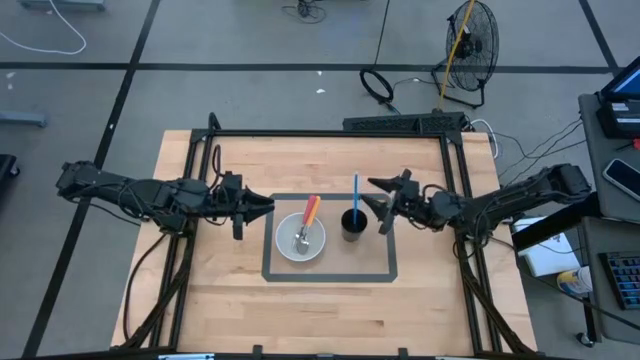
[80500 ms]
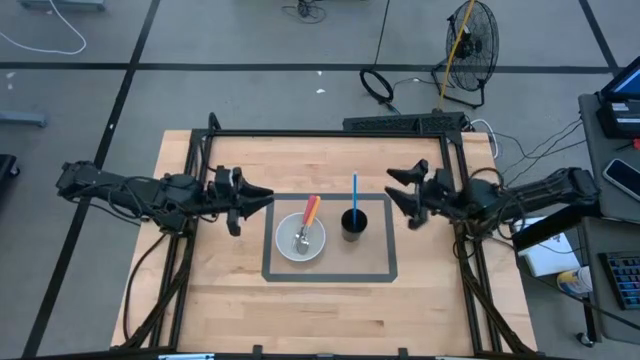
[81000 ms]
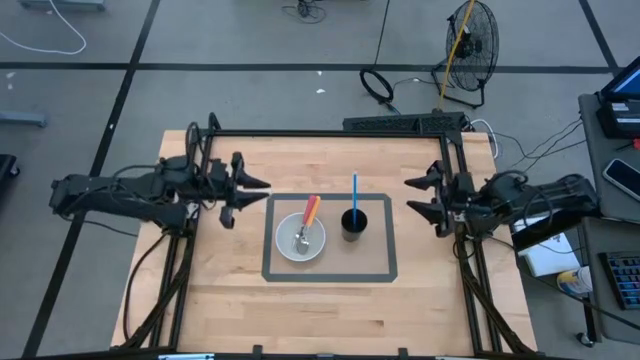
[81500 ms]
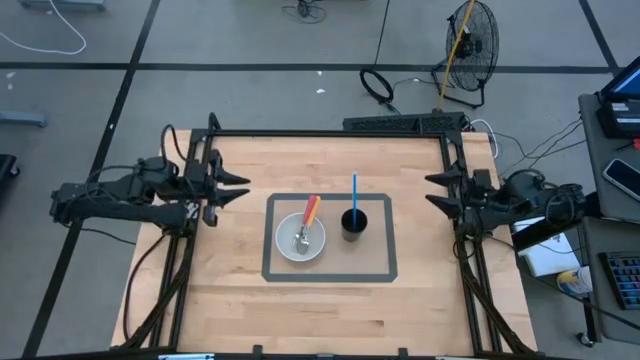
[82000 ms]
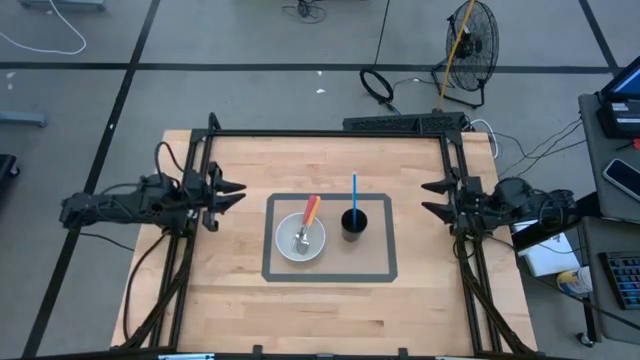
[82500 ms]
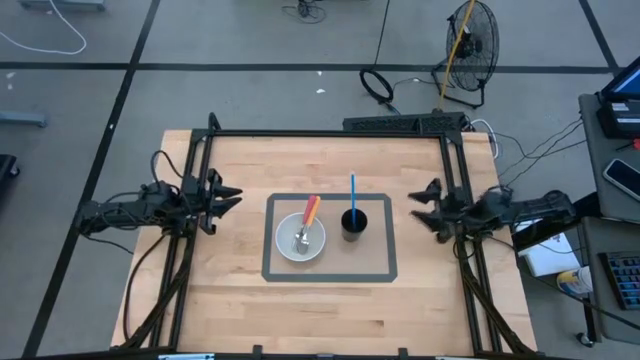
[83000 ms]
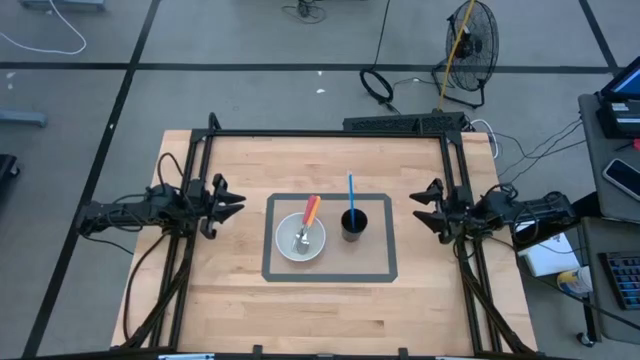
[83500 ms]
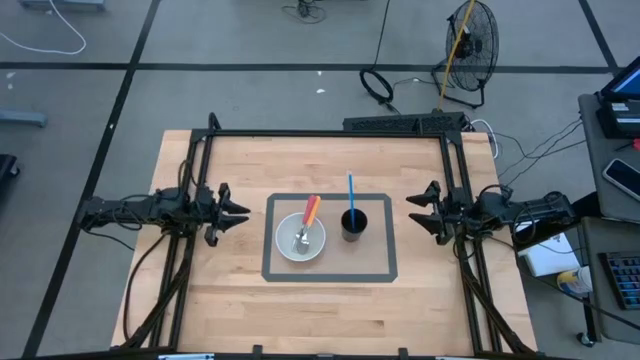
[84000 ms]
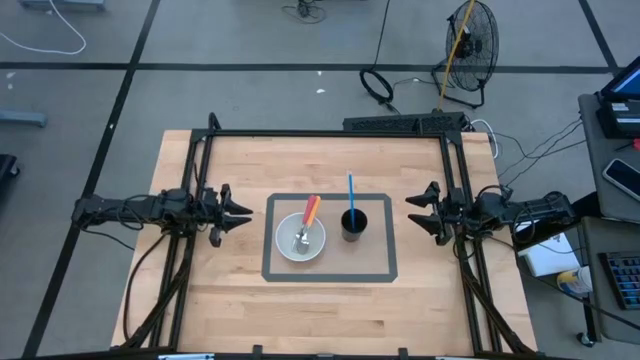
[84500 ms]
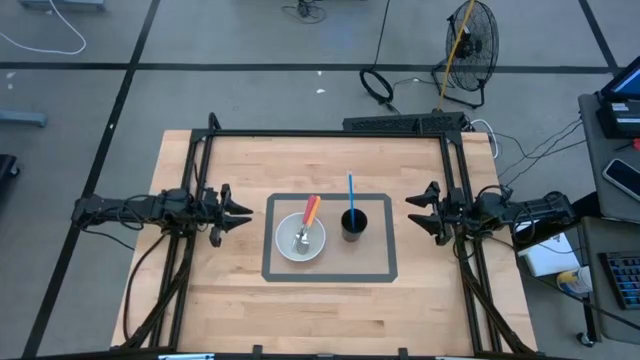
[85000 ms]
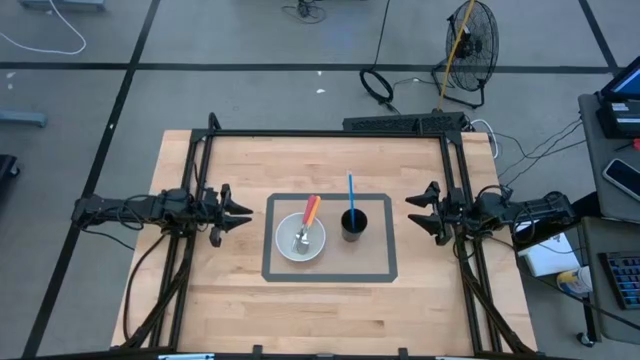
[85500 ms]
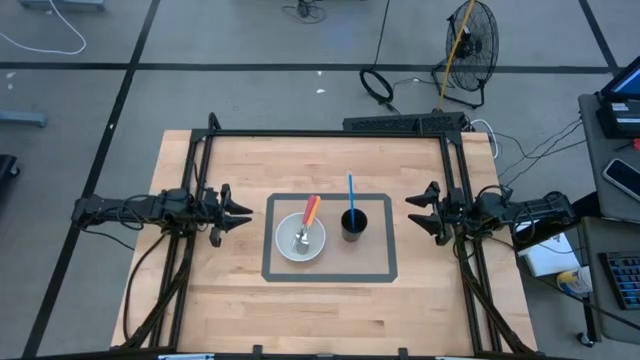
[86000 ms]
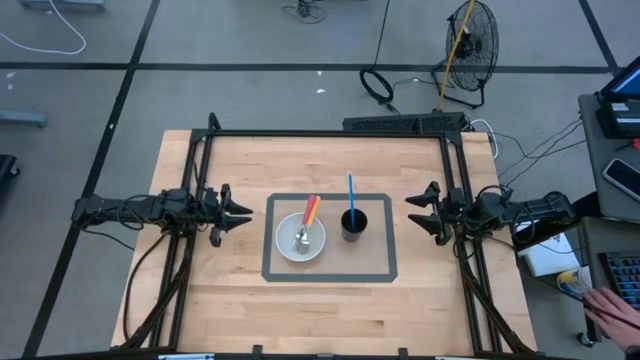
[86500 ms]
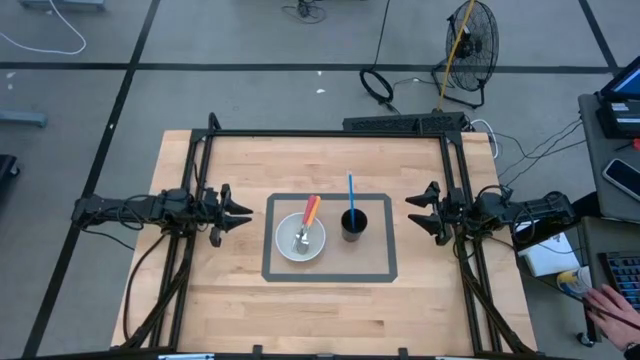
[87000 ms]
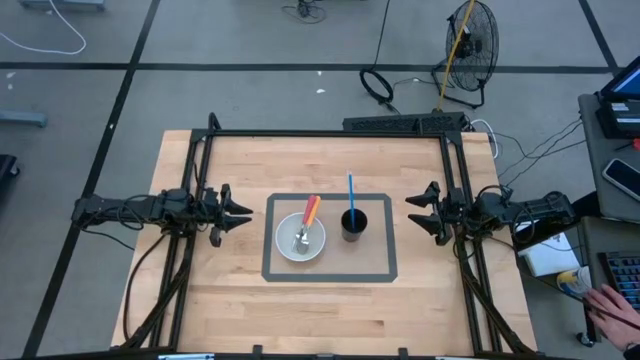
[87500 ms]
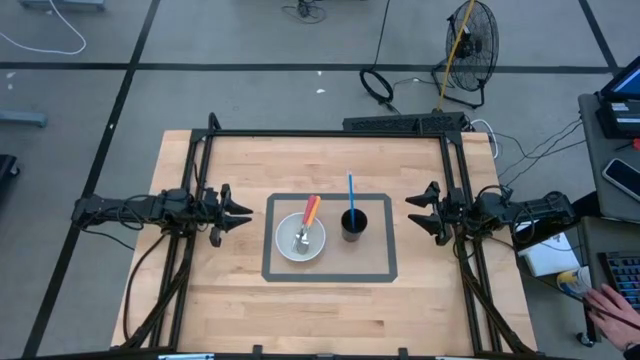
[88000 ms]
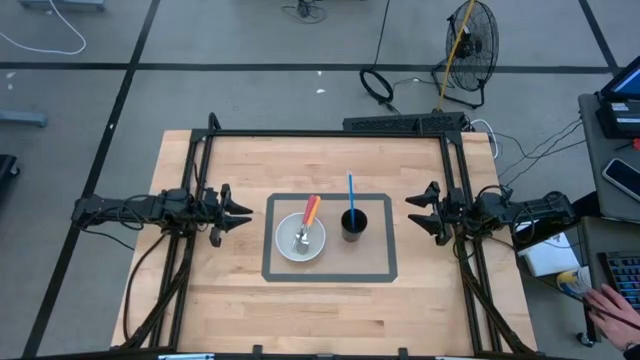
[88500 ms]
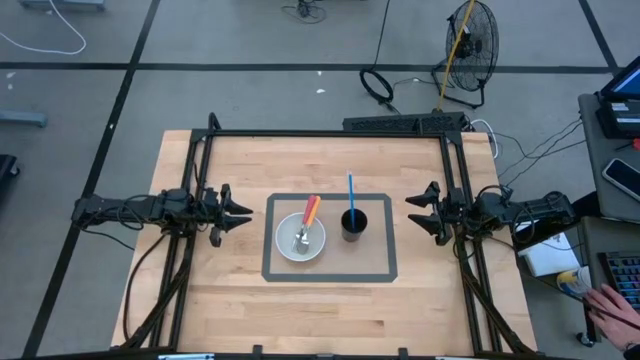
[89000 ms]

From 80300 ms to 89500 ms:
Task: Pick & Place Utensil
Return to Home Position

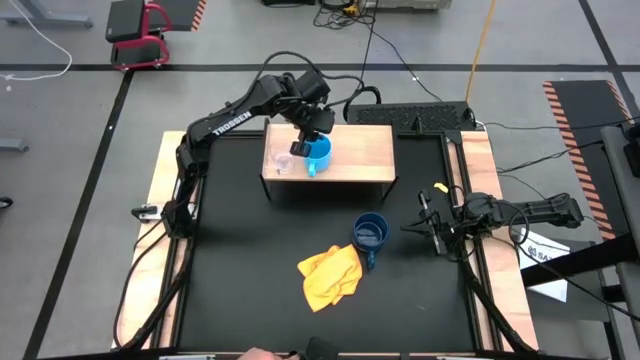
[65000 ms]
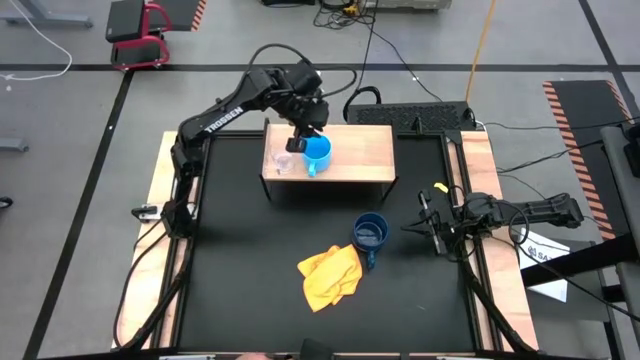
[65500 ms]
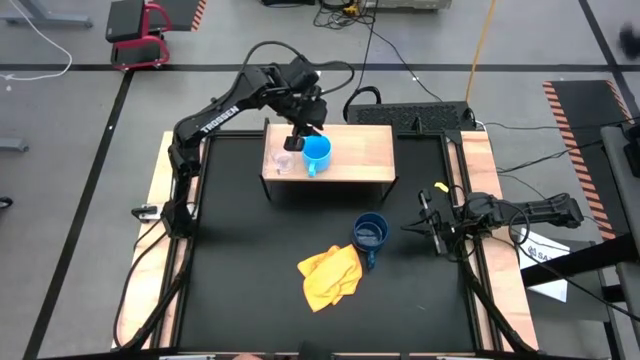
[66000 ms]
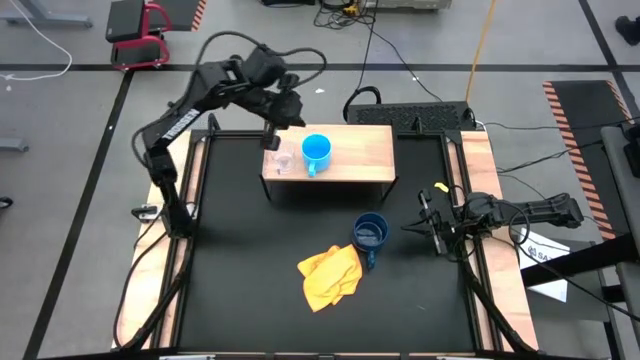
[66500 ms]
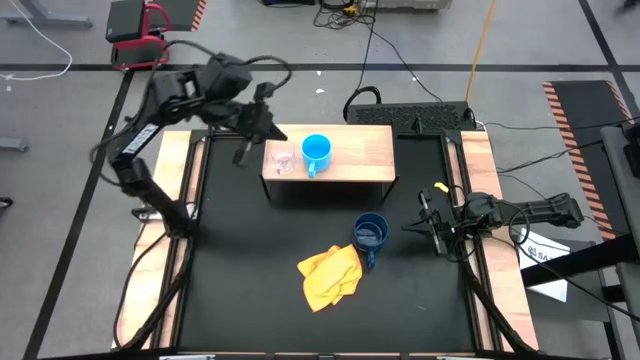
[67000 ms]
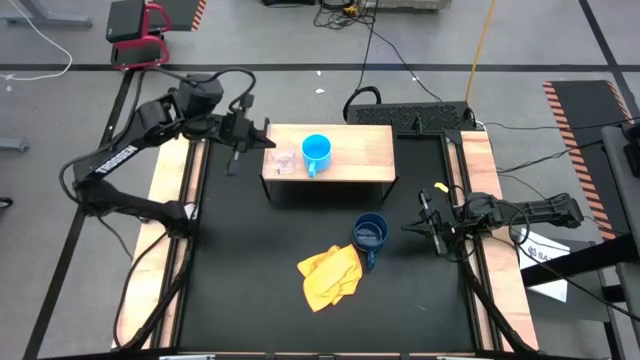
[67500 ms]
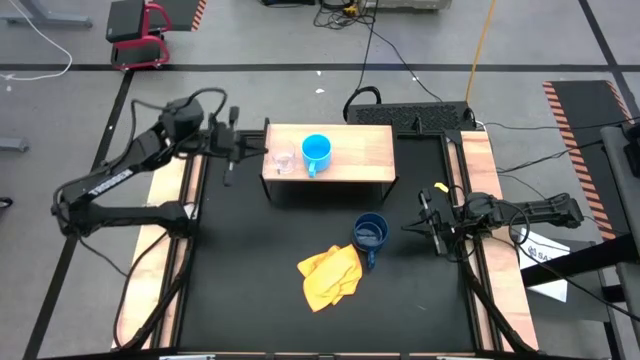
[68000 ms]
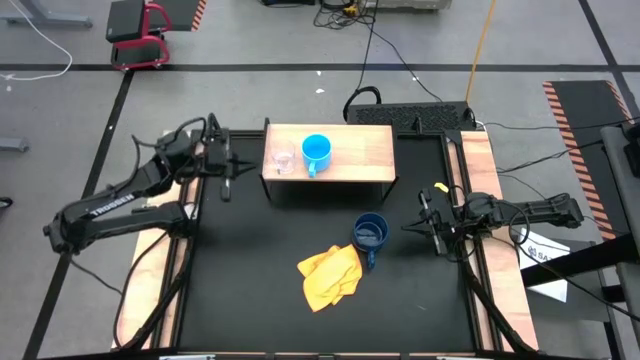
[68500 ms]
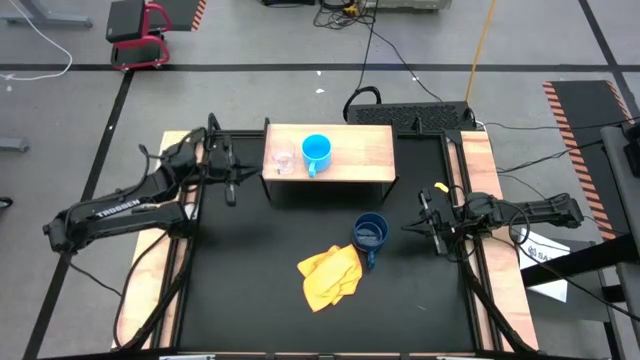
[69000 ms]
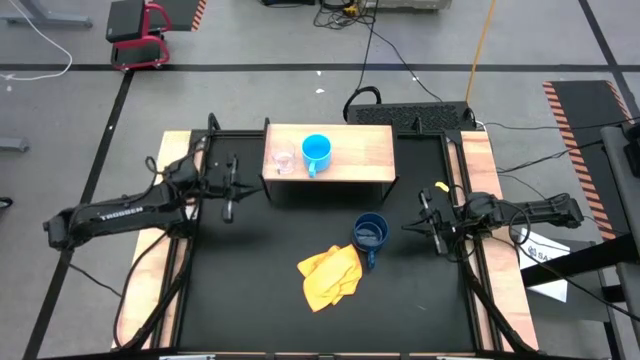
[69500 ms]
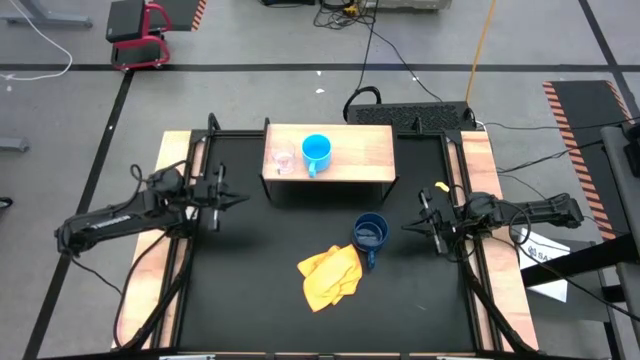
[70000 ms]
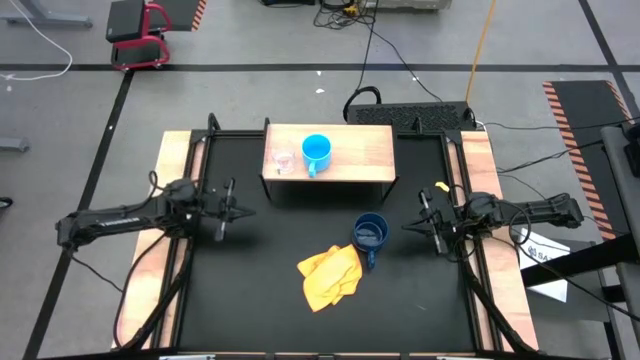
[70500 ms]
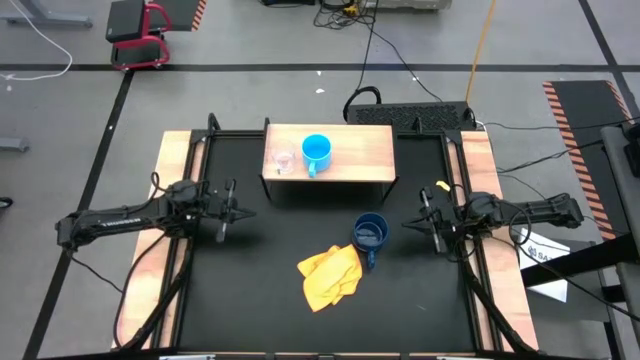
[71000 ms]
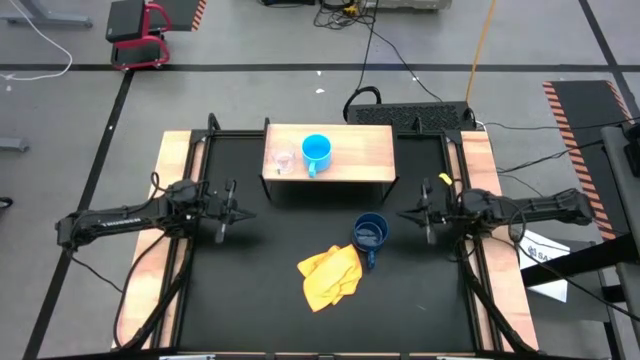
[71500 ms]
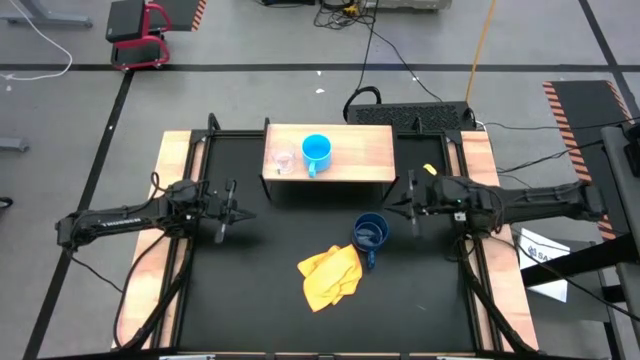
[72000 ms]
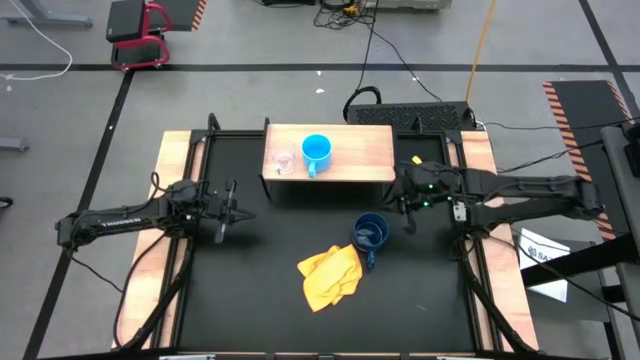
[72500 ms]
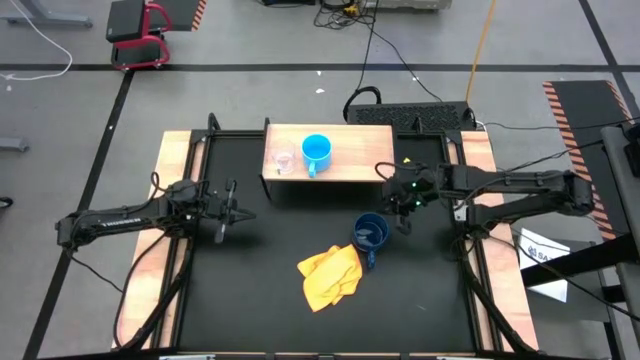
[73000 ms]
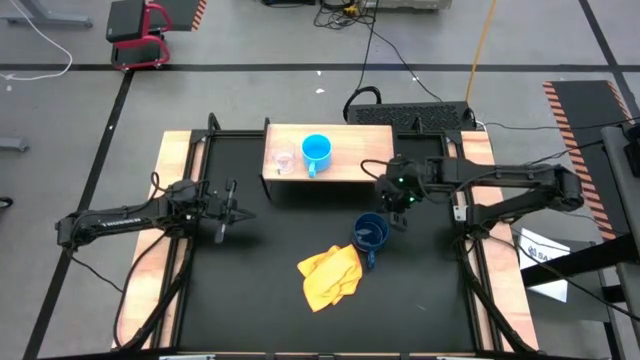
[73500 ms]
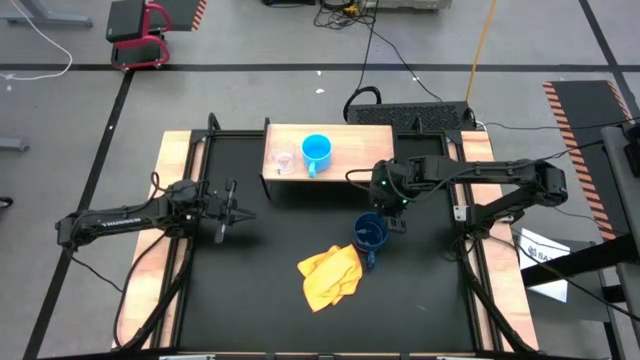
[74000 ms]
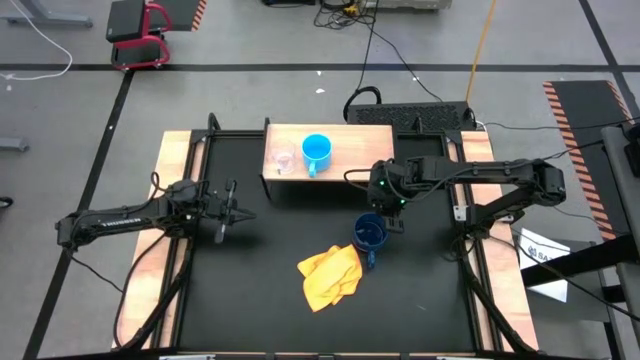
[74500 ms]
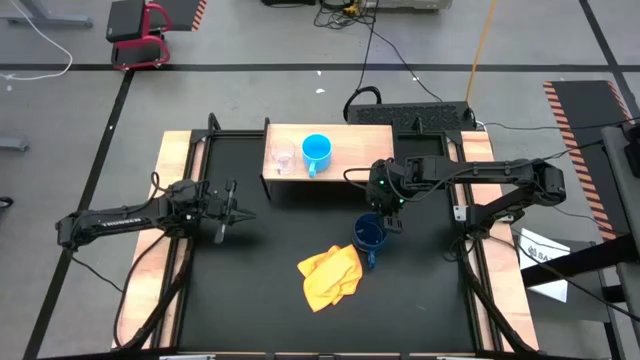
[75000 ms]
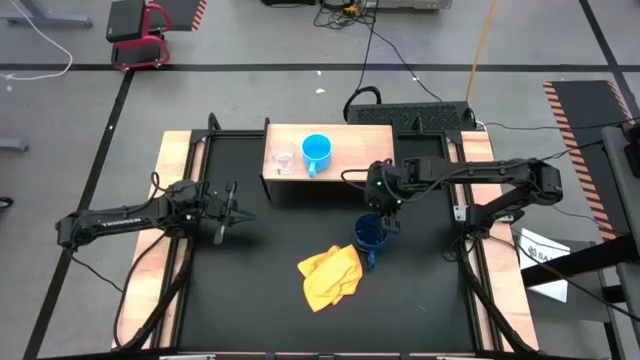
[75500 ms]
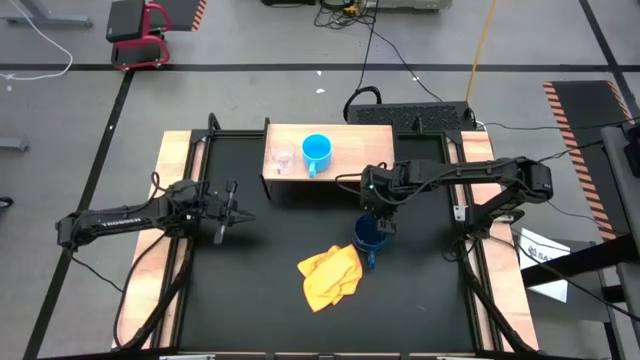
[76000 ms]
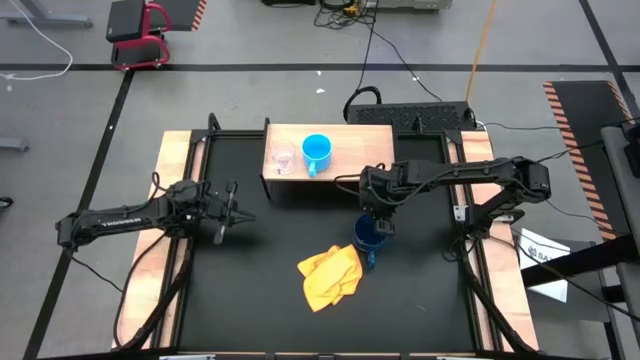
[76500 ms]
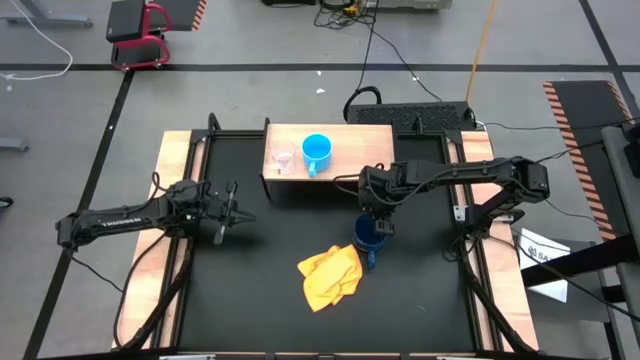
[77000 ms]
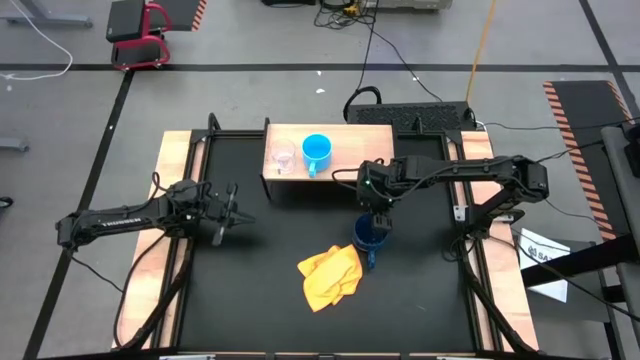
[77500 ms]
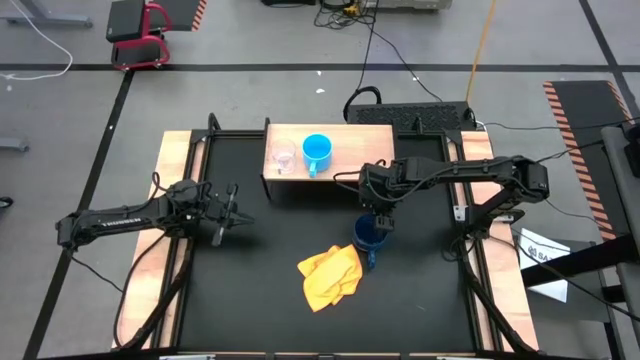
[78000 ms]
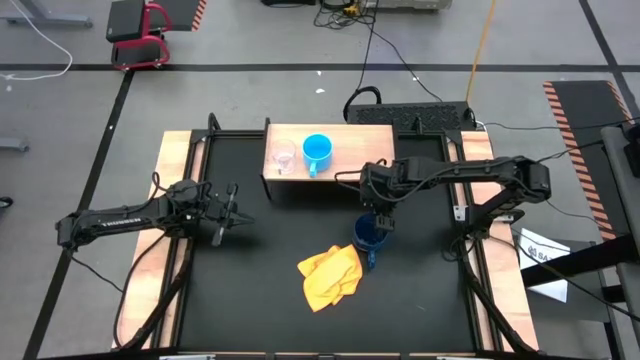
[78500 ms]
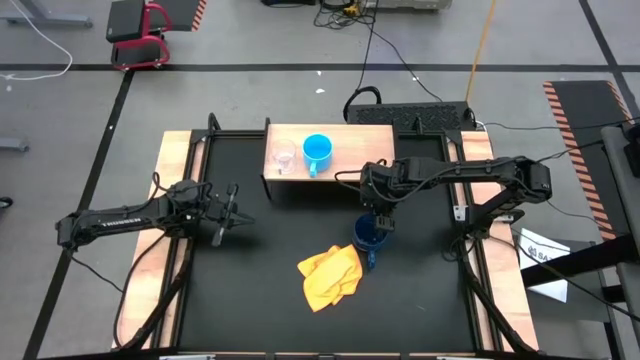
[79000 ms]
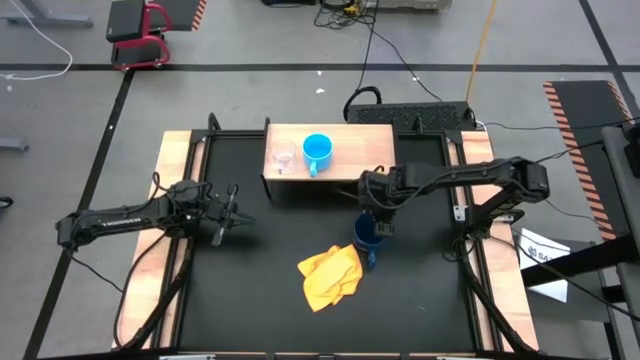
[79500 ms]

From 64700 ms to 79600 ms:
Task: Stack small to large cups/mugs on shelf
Put the dark blue mug on the shelf
